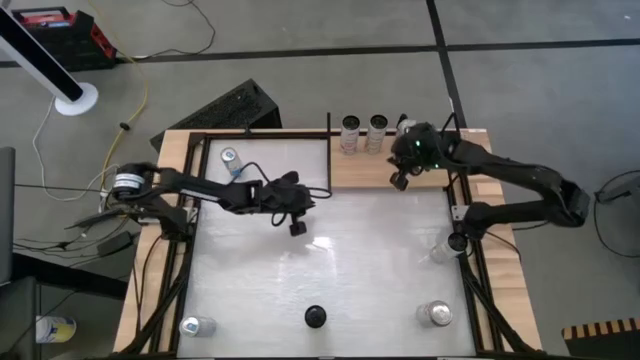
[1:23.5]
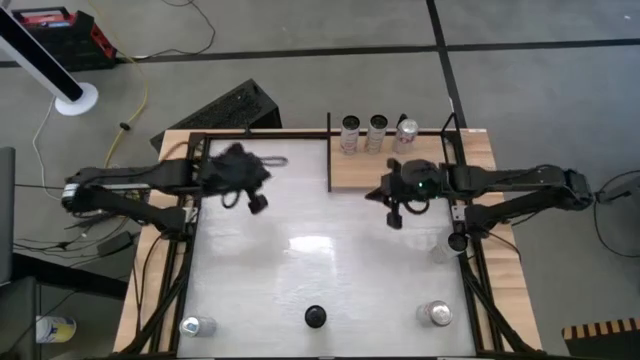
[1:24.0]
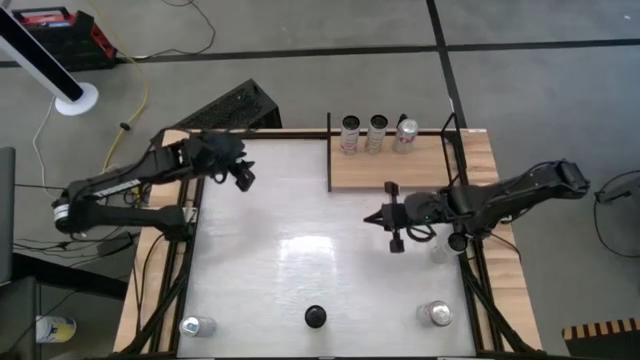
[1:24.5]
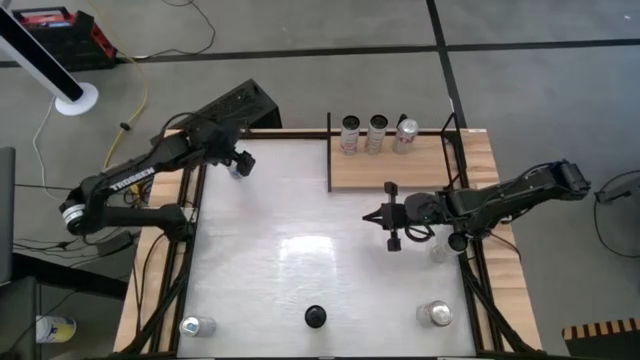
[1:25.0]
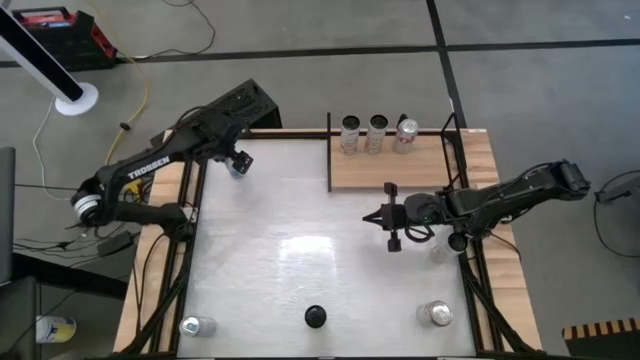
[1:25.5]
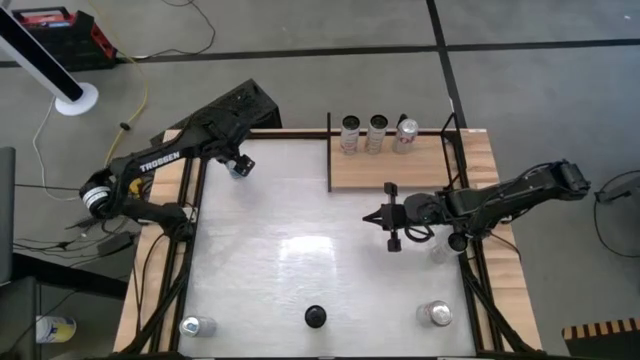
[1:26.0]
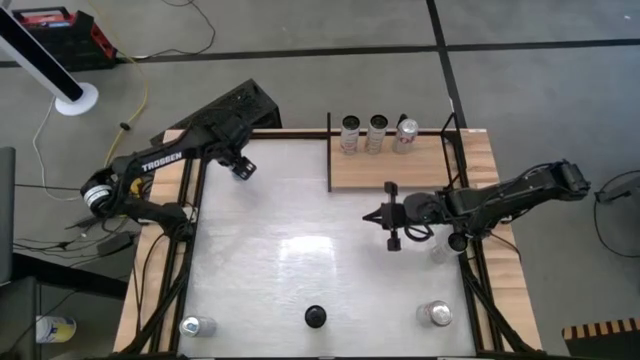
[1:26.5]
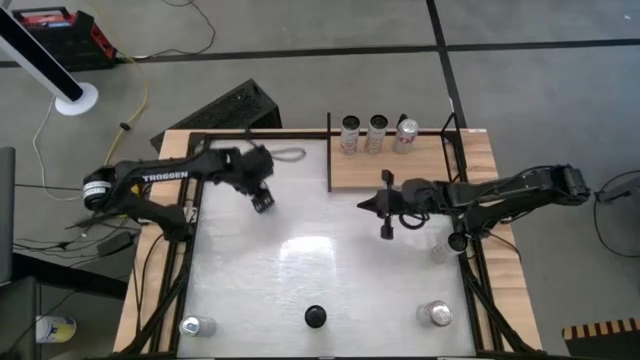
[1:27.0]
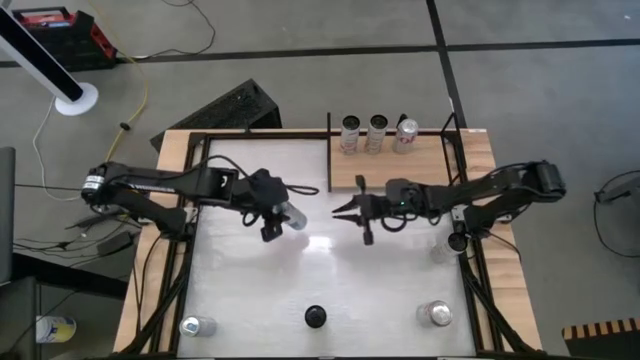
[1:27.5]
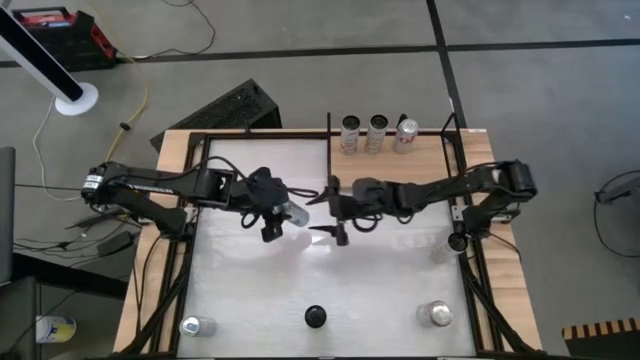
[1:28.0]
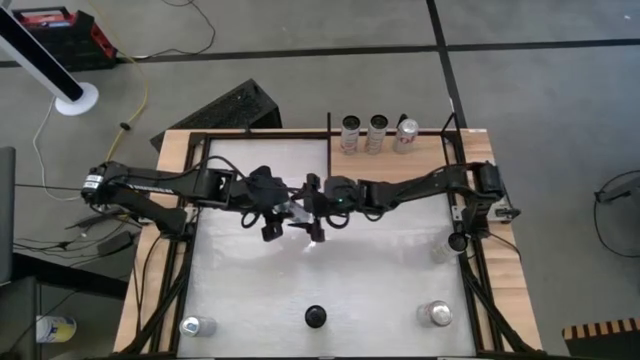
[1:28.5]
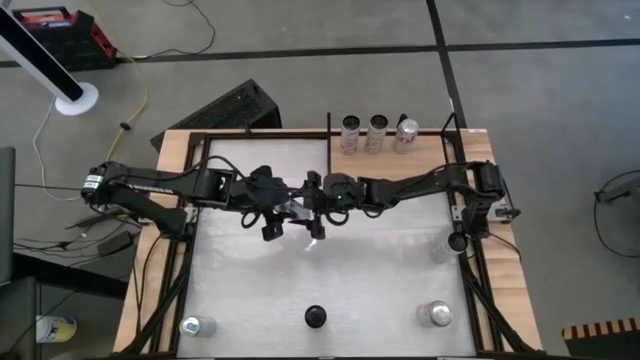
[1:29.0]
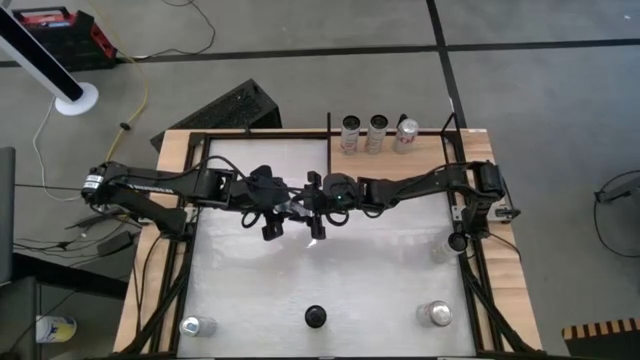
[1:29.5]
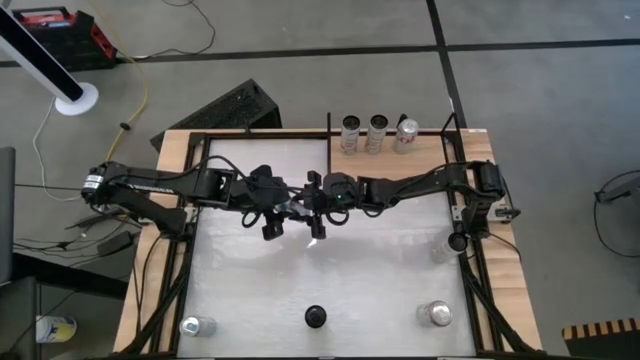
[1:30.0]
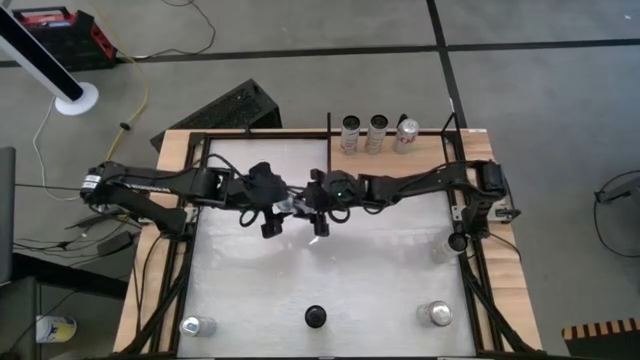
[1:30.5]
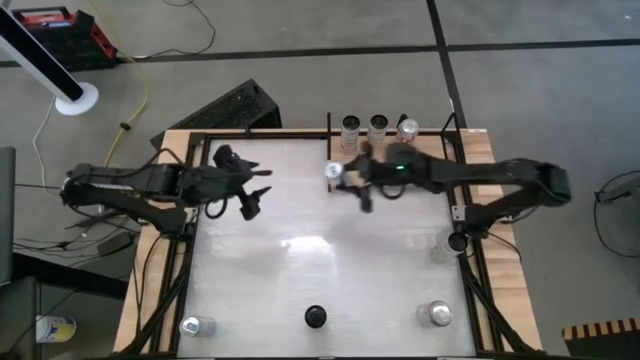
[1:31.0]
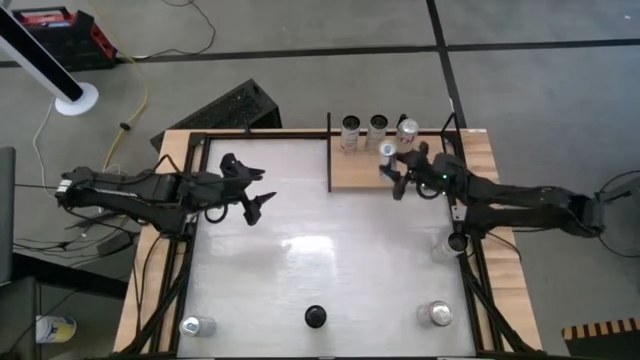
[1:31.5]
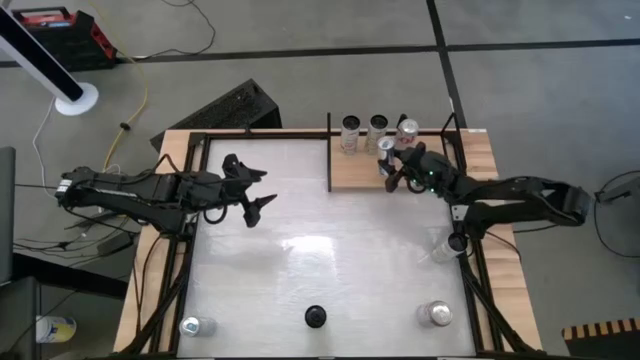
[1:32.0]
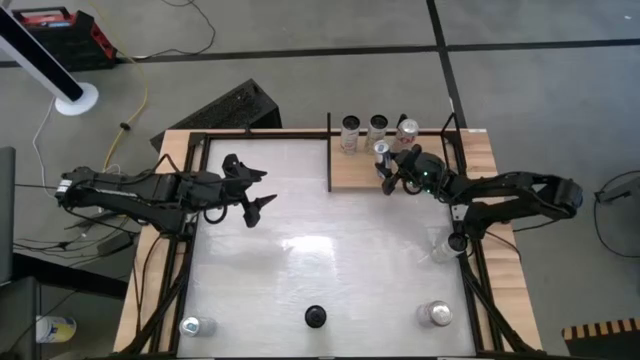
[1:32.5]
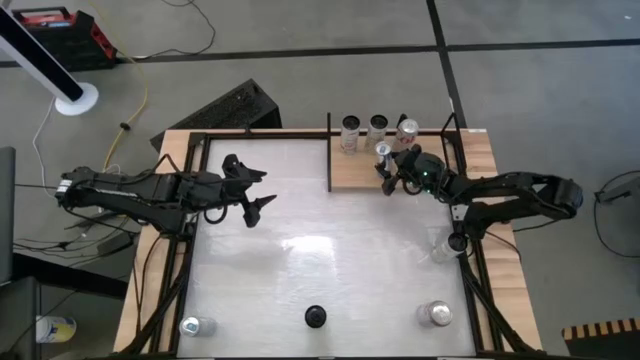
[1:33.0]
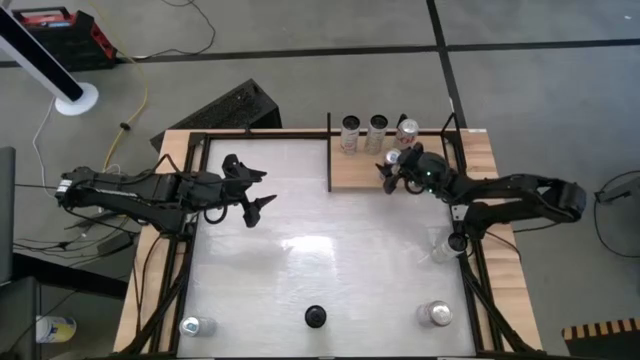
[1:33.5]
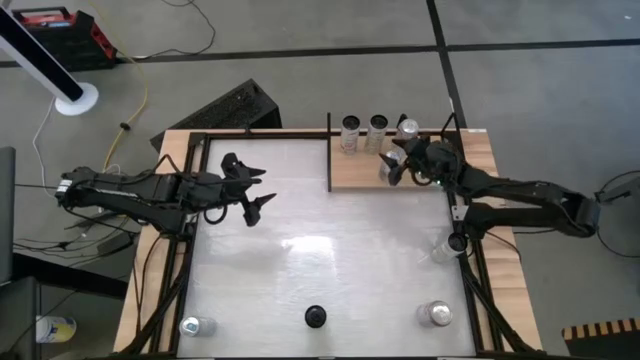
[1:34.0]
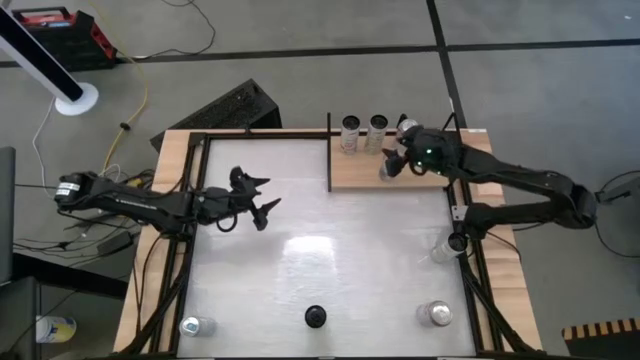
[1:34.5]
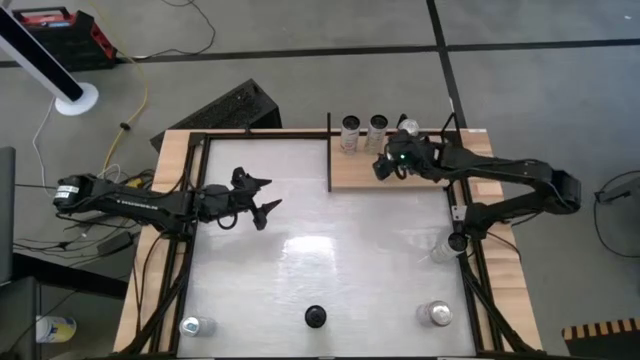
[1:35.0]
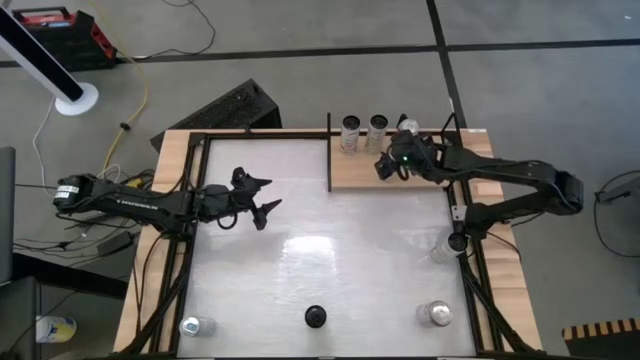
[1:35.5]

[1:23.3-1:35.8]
Task: Place canned beverage on shelf
Put the top blue soda can on the shelf

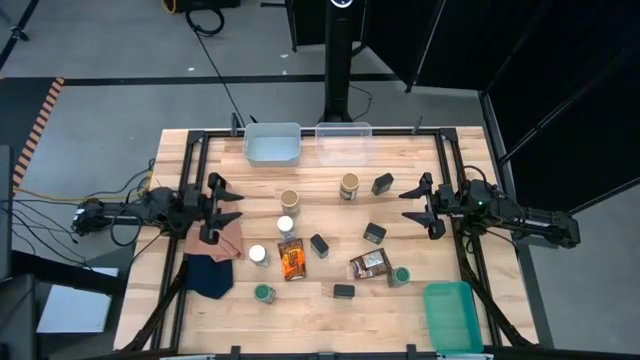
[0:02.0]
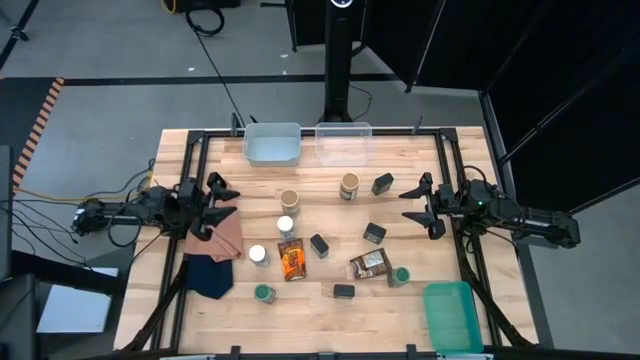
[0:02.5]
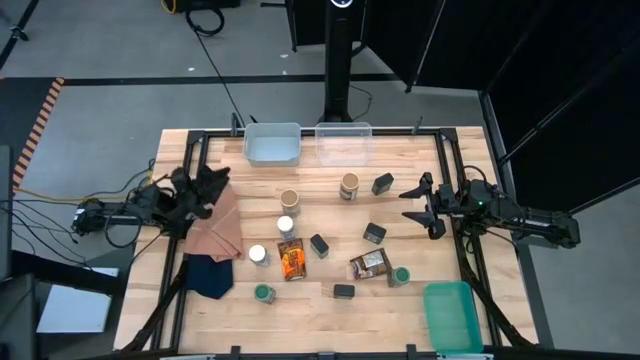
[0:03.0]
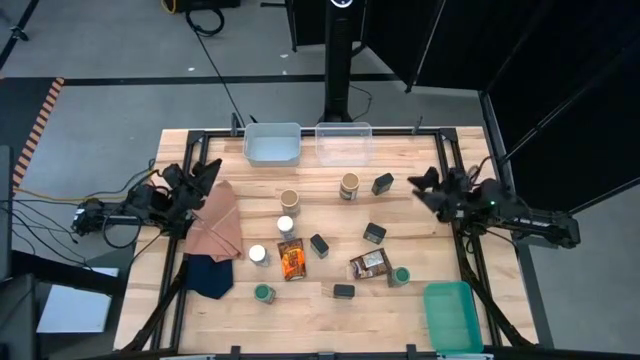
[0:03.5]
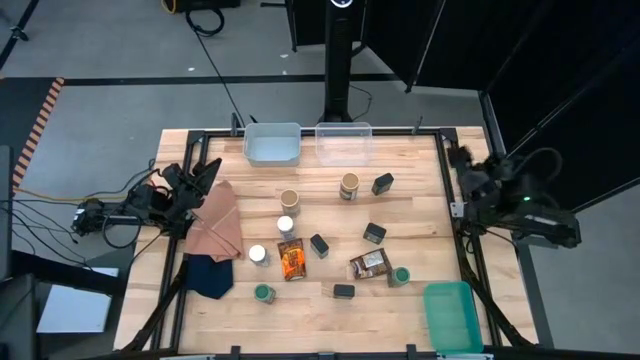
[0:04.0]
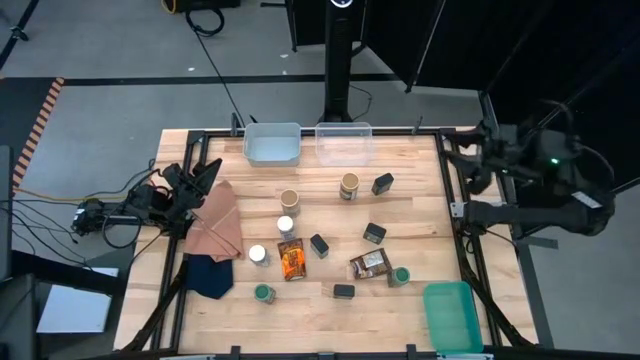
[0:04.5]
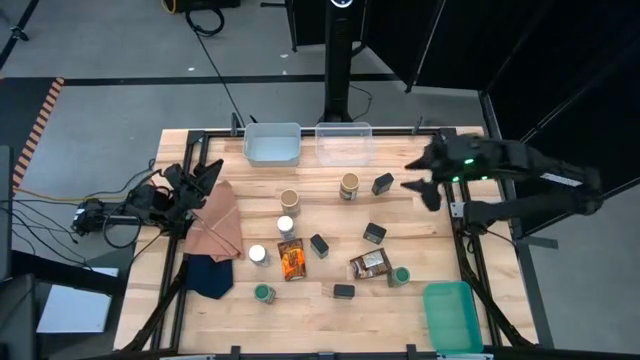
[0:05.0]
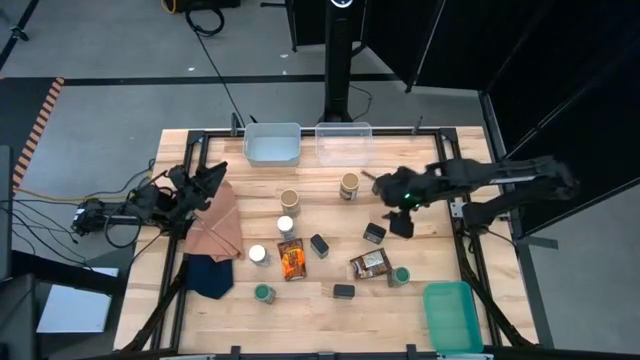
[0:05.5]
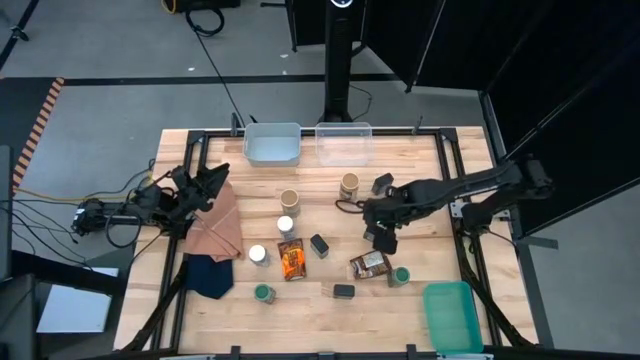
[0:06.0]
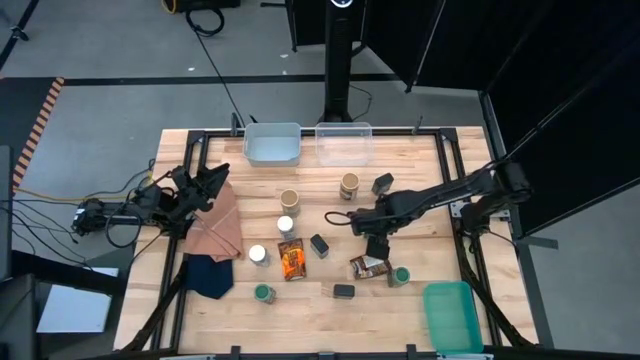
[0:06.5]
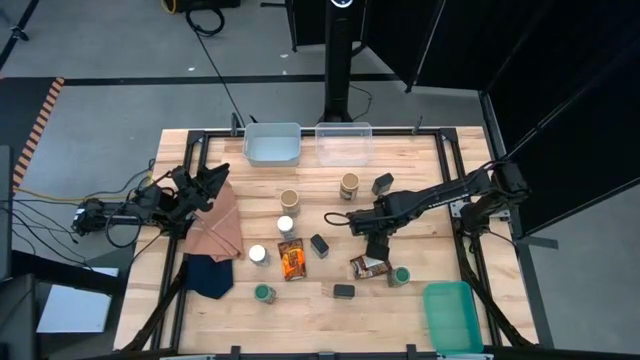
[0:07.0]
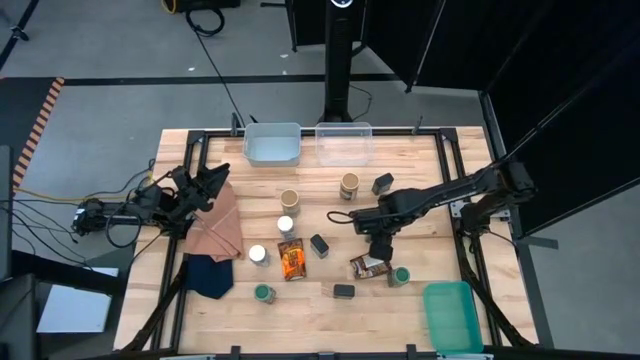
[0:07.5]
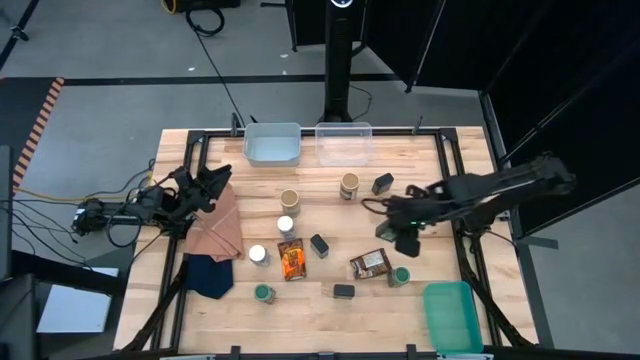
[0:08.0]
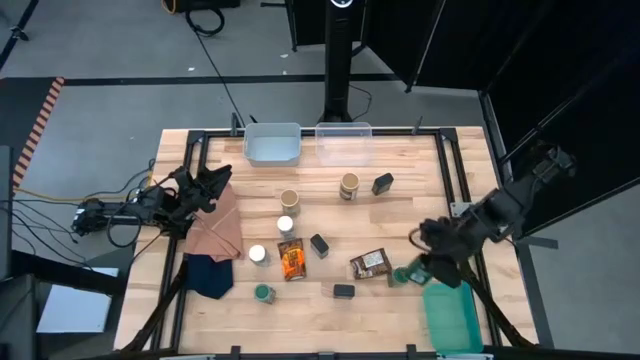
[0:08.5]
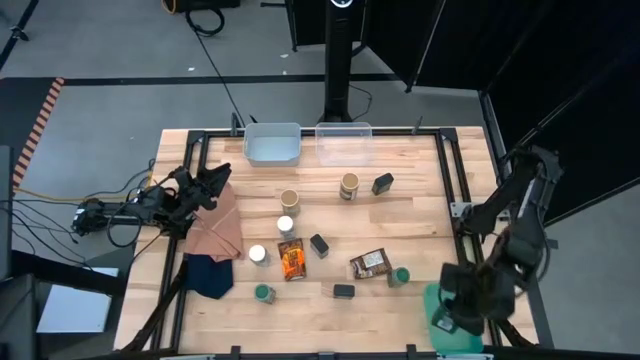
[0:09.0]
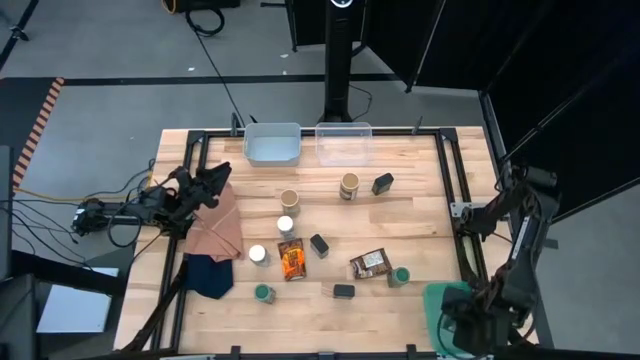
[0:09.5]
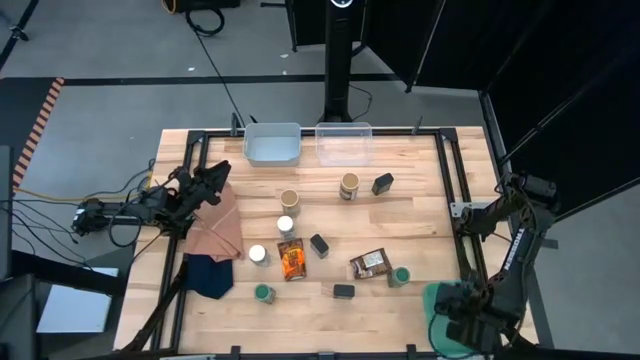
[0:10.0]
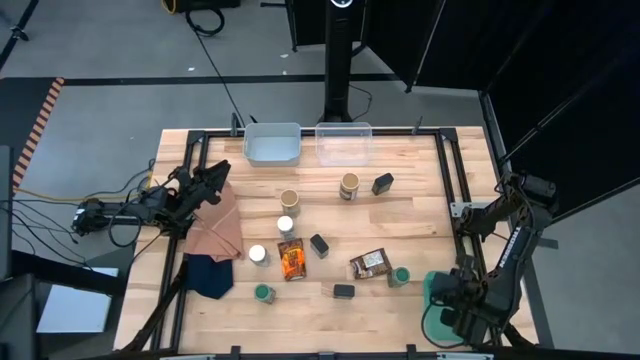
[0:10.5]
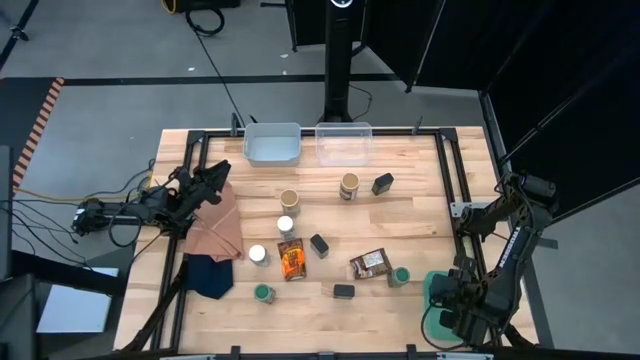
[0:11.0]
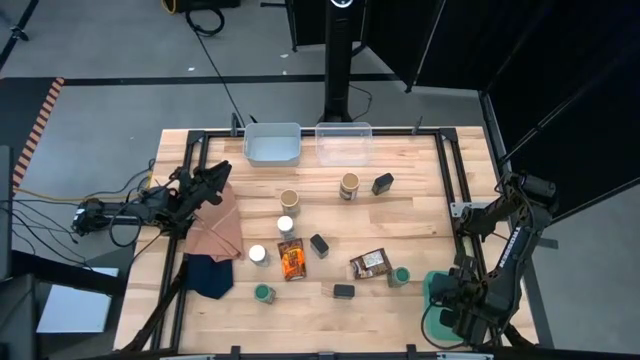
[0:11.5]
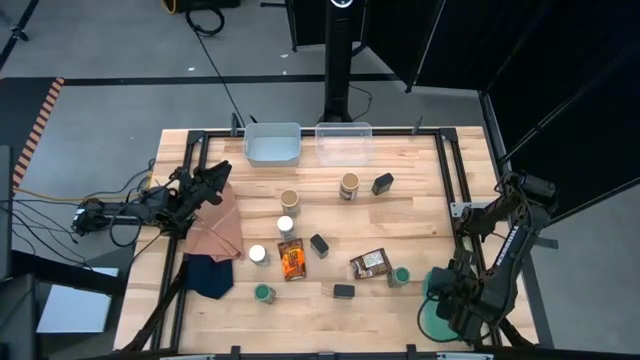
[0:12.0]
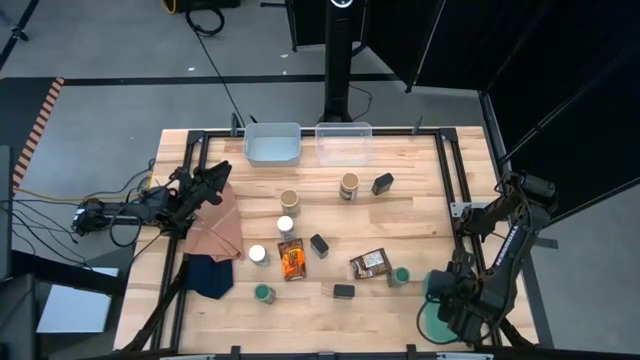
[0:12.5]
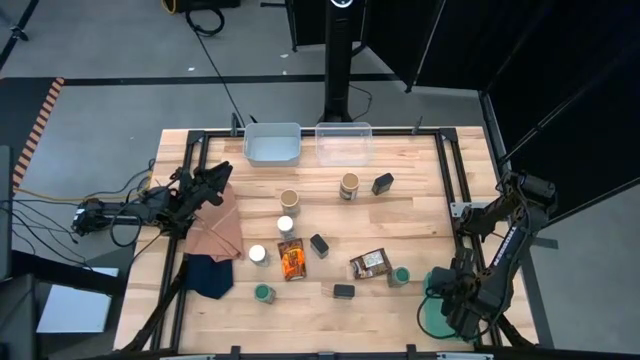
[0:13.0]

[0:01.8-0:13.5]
Task: Sort spices by type
Put the bottom right black seasoning can into the green bin
